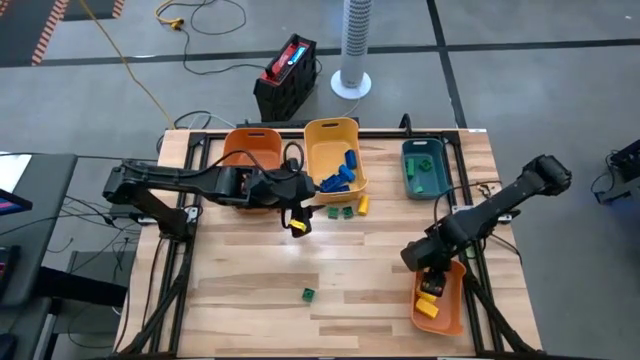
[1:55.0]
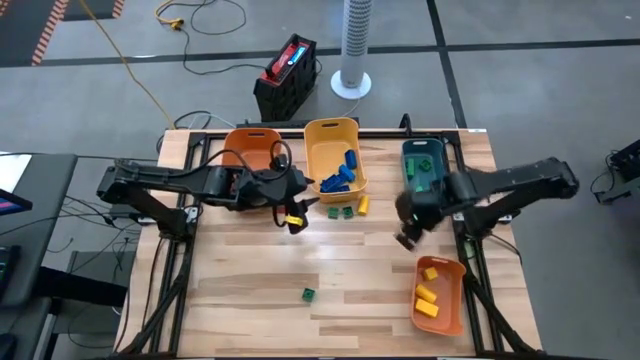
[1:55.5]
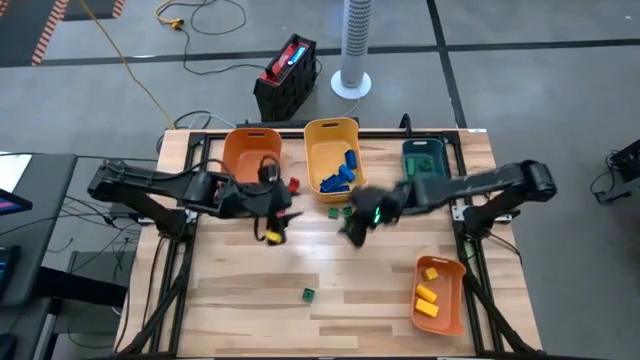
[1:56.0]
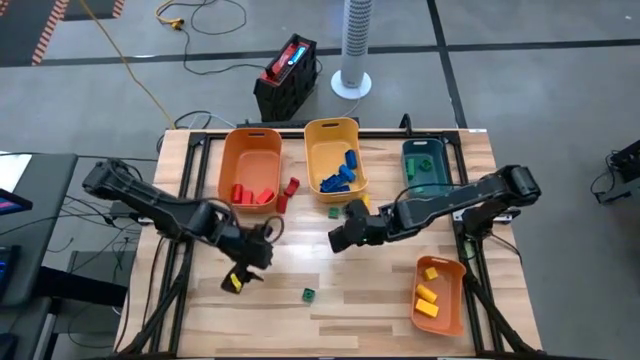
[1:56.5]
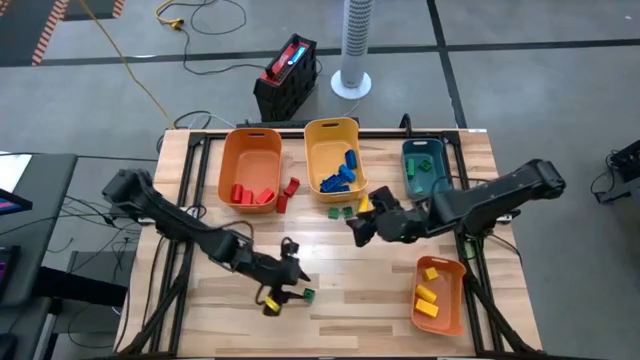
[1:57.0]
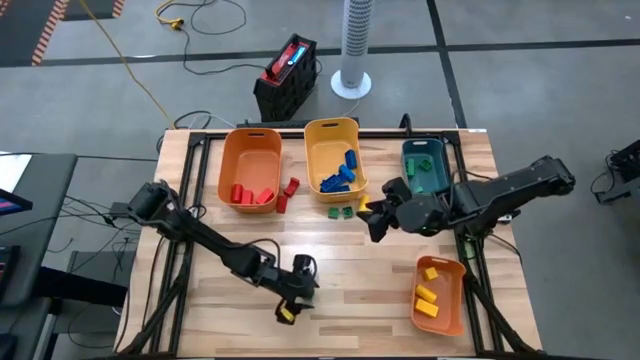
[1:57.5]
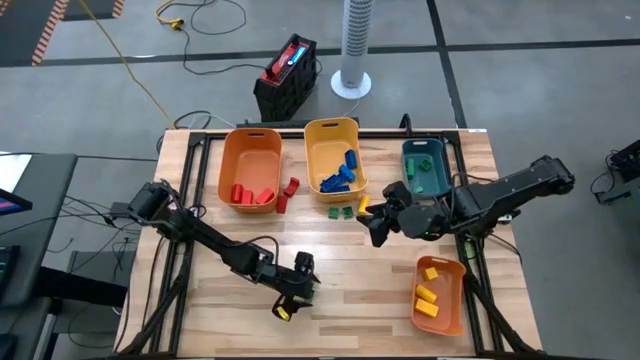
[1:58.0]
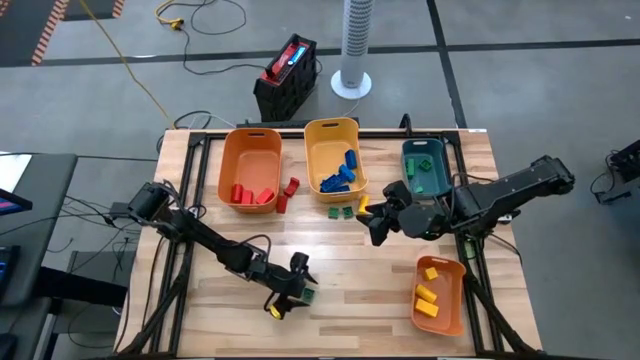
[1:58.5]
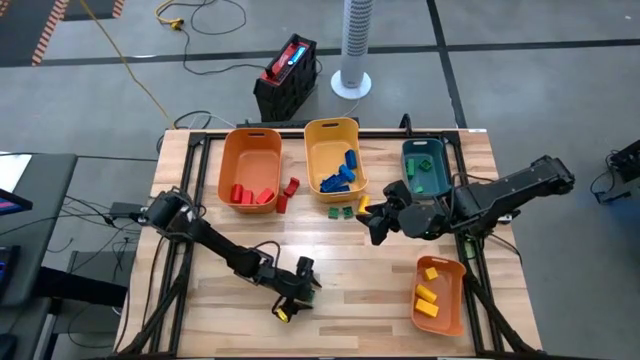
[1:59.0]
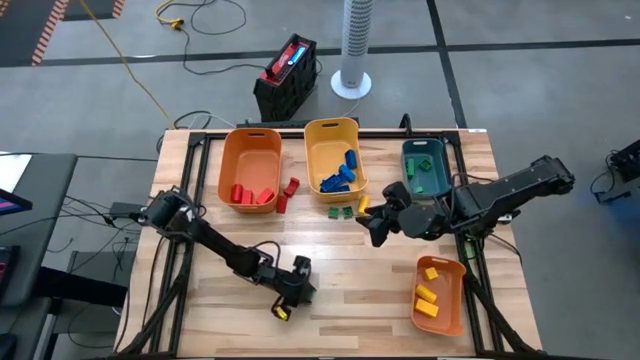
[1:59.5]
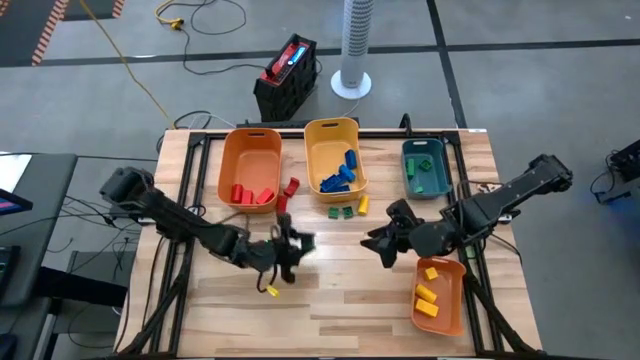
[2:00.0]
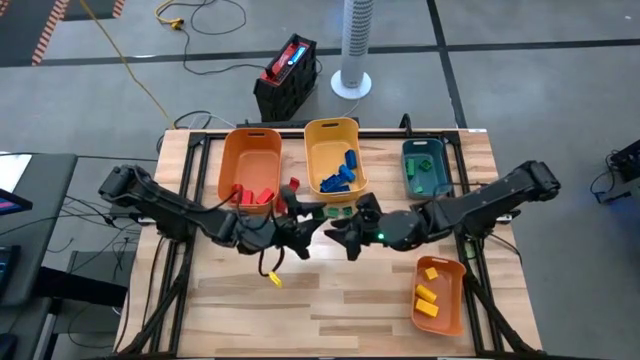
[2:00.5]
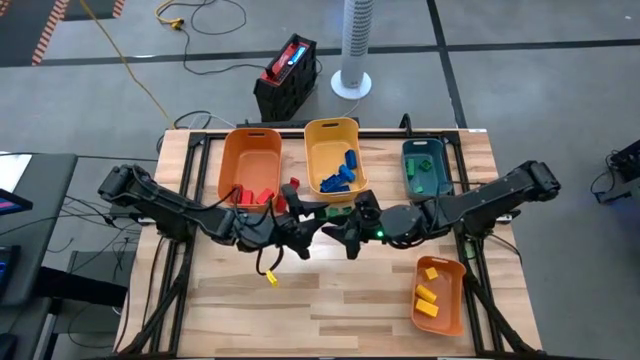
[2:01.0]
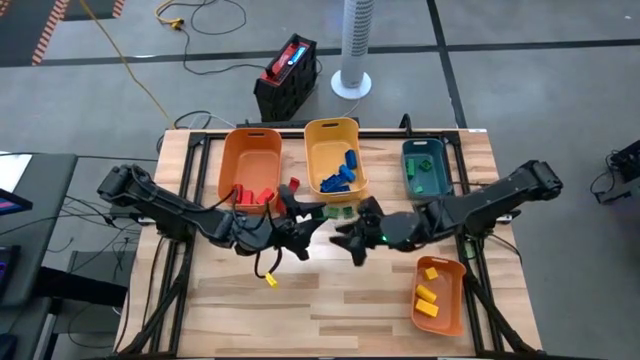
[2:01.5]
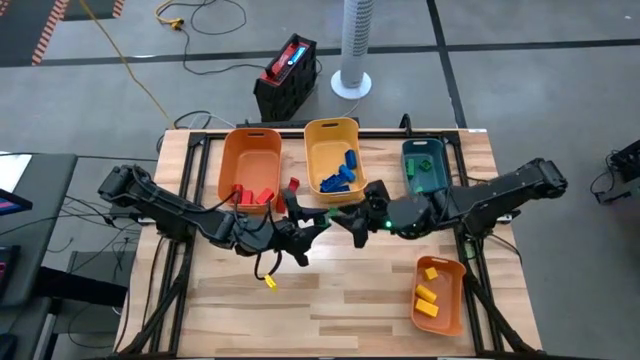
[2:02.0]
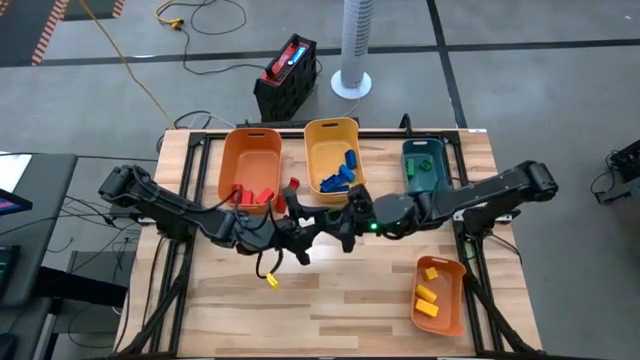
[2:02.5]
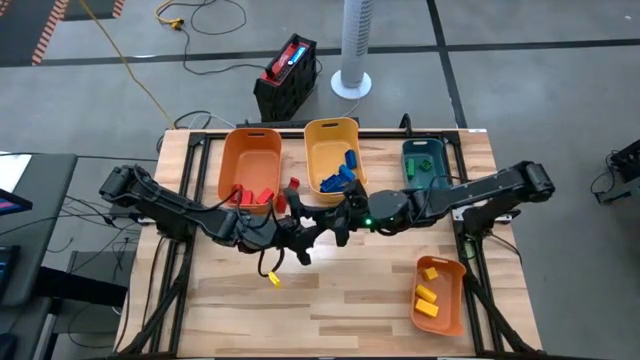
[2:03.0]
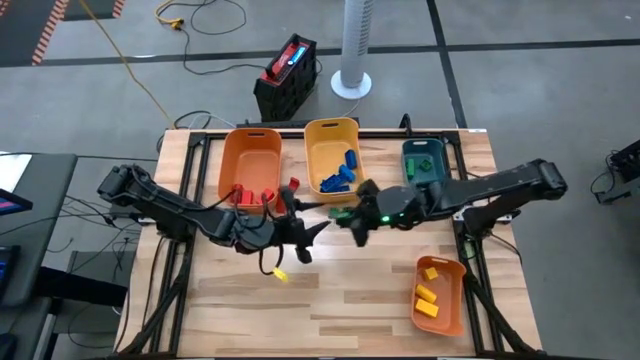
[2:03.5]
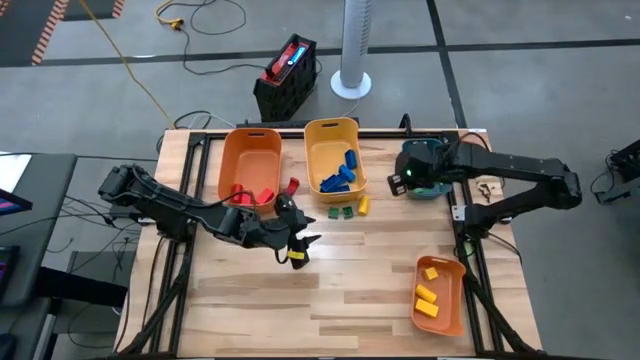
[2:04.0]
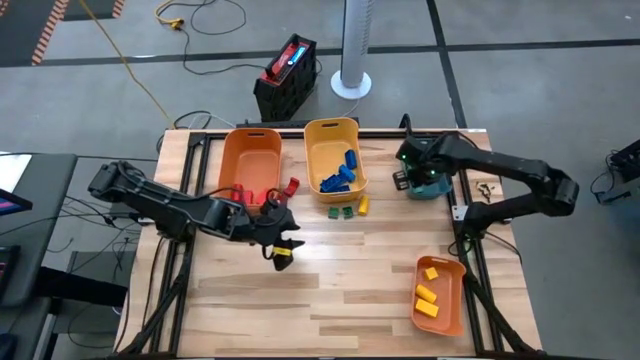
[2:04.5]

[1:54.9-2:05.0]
Task: Sort blocks
Put the green game piece into the blue bin

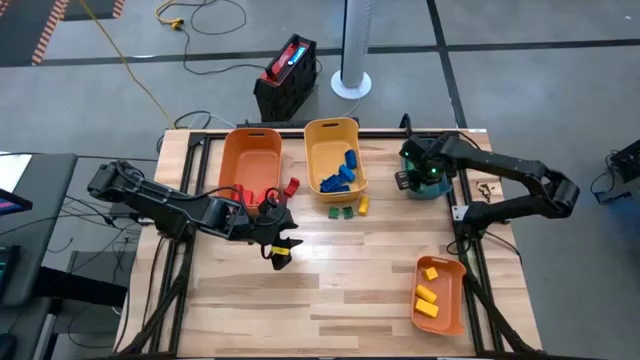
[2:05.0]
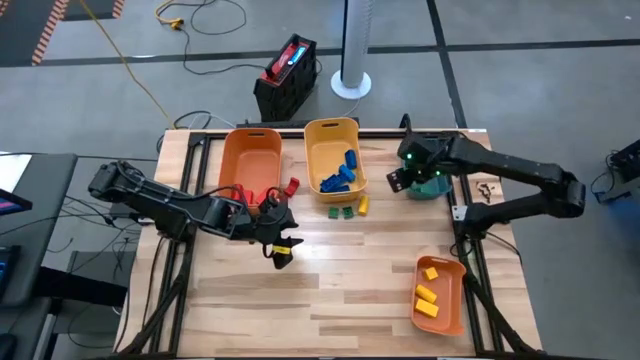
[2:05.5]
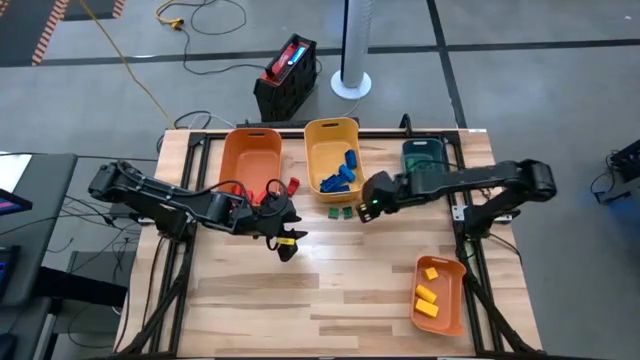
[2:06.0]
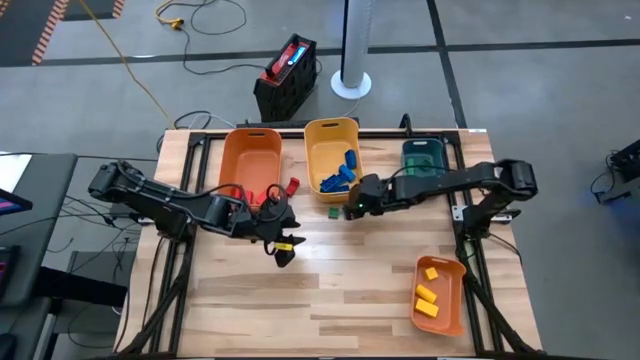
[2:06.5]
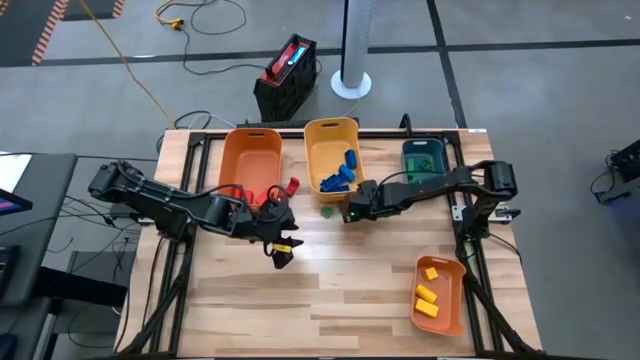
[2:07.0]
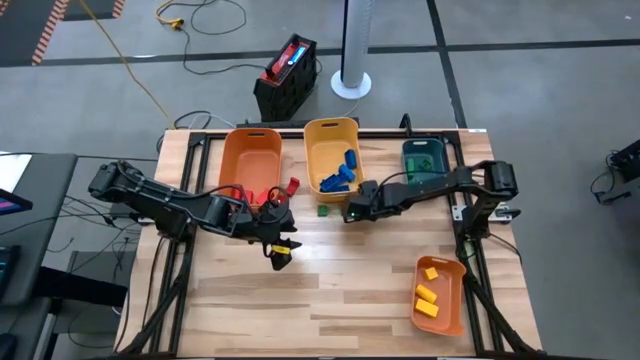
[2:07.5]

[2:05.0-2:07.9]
Put the yellow block into the bottom orange bin

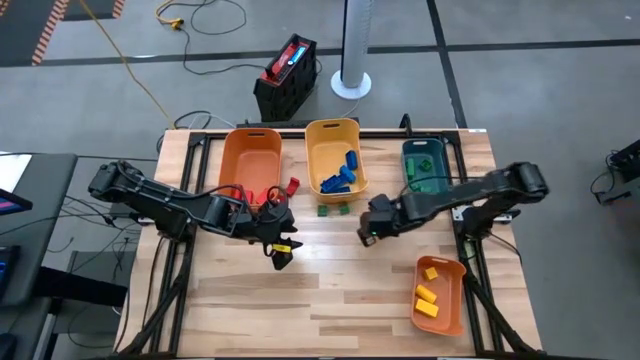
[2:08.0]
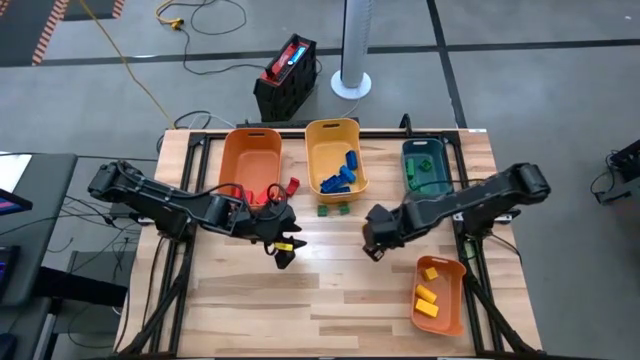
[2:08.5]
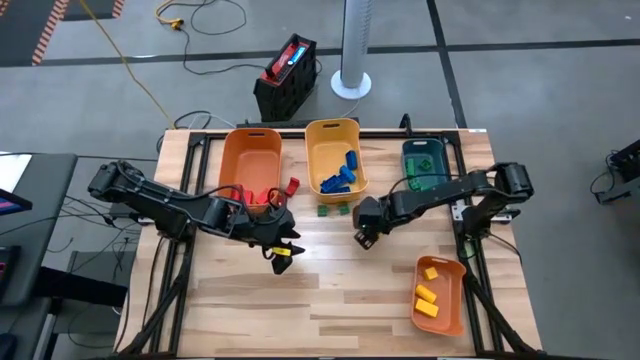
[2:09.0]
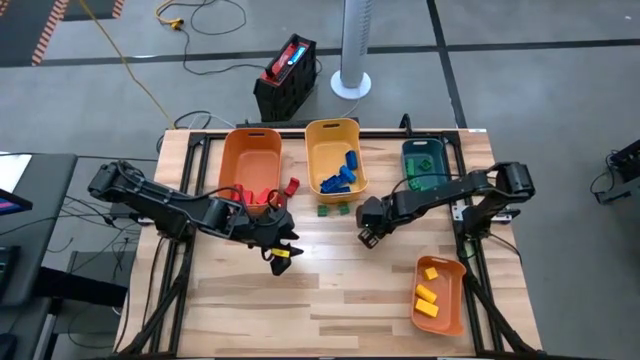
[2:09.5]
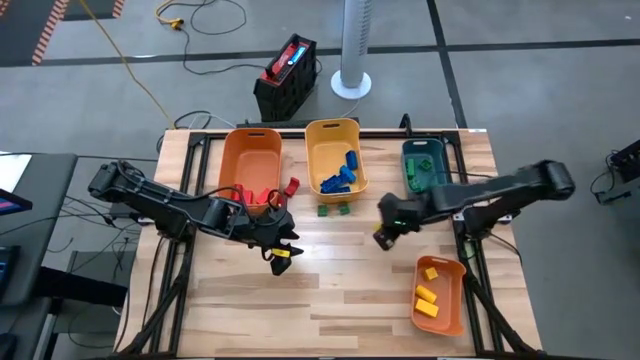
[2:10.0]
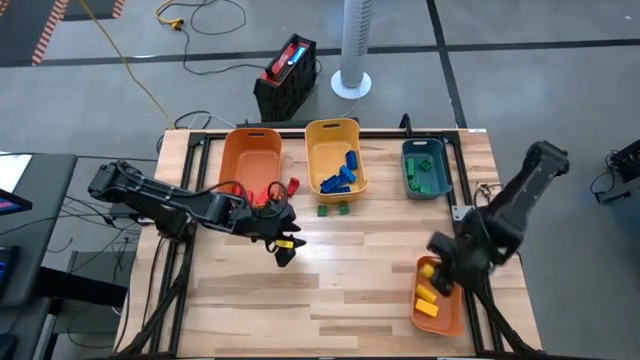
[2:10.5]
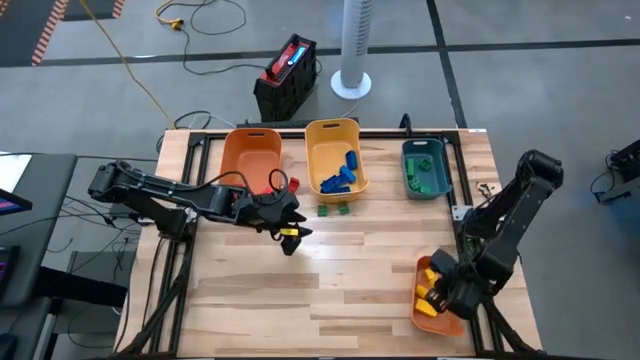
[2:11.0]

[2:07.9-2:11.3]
Put the yellow block into the bottom orange bin

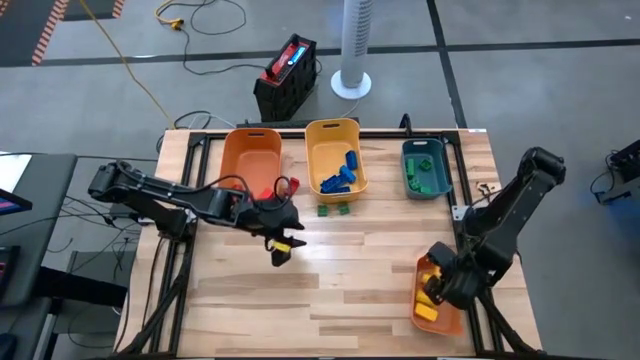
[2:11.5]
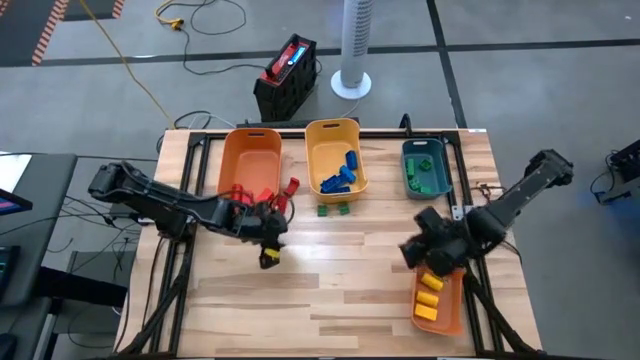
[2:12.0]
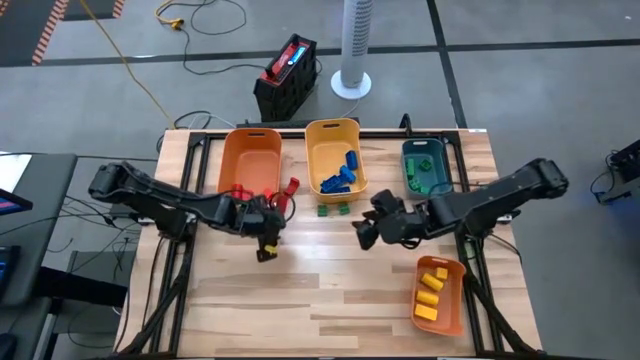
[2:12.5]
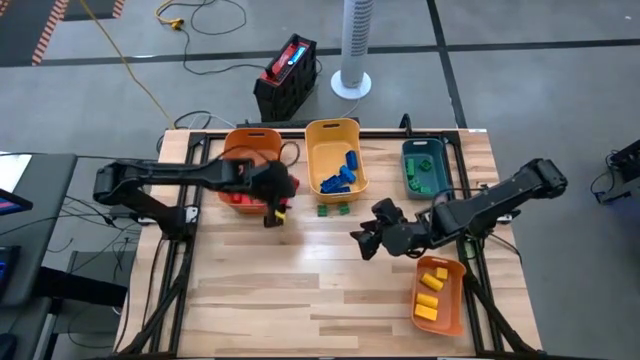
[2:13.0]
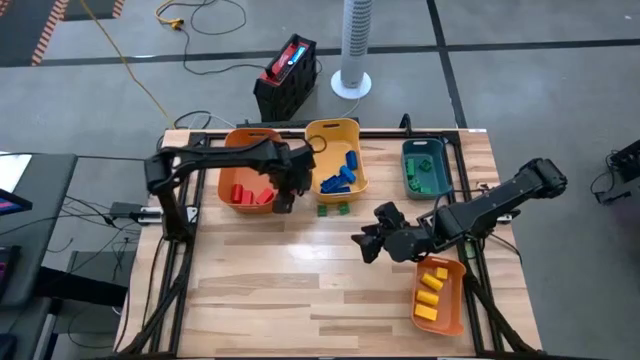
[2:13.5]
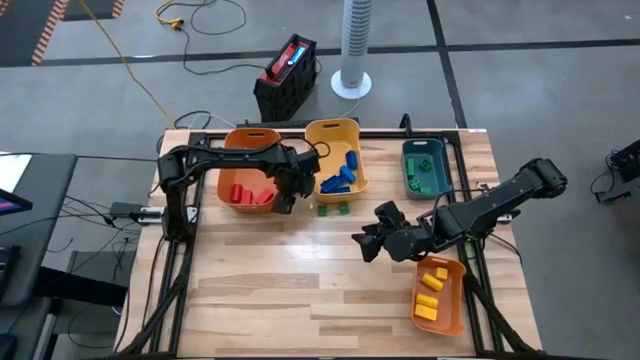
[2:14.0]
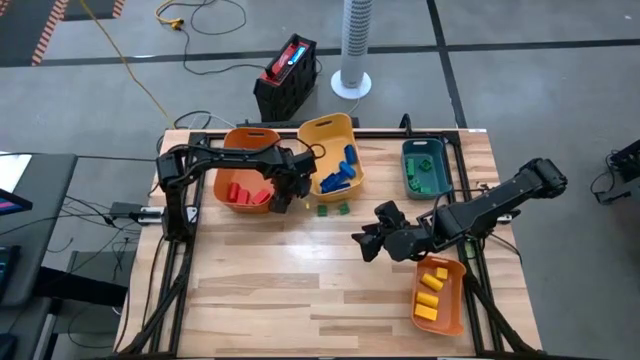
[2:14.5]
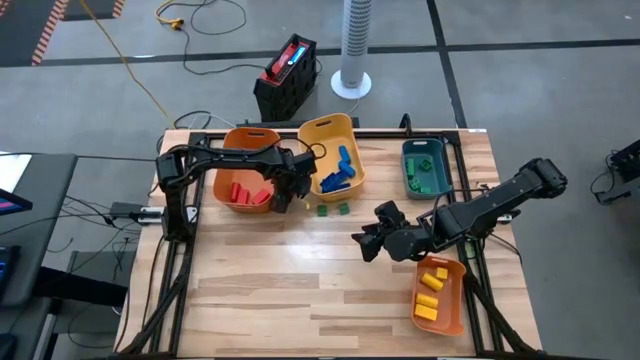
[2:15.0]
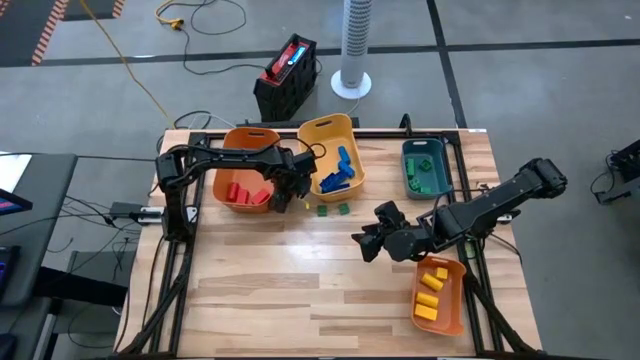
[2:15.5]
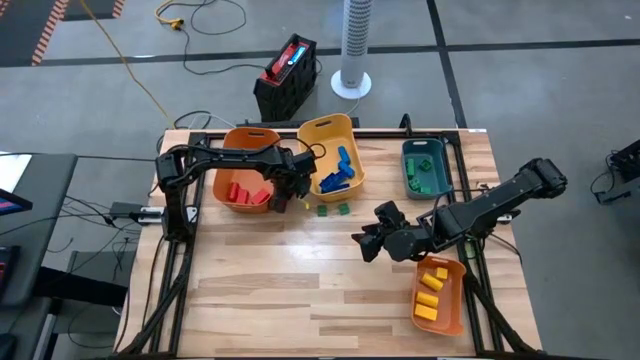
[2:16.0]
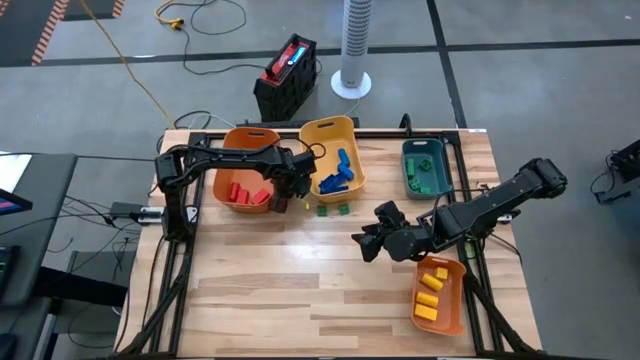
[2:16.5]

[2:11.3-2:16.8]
Put the red block into the top orange bin
